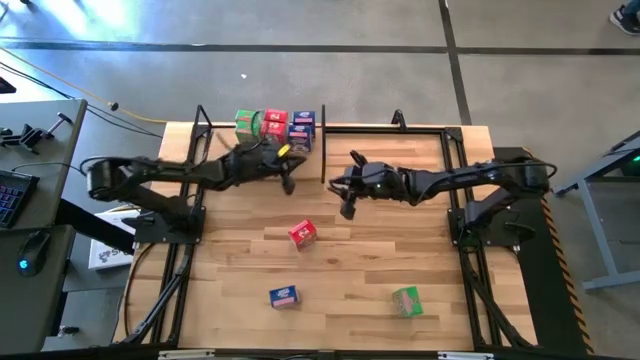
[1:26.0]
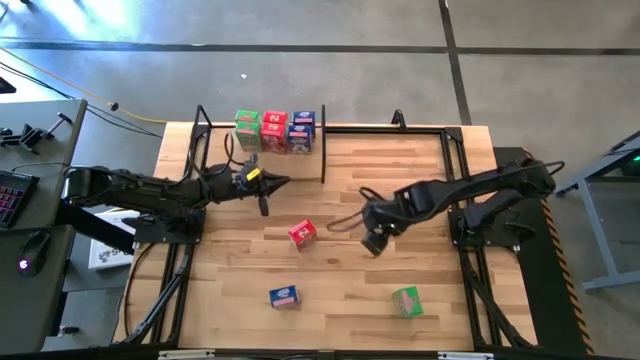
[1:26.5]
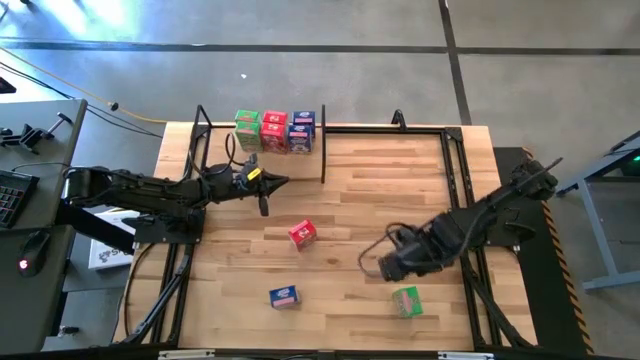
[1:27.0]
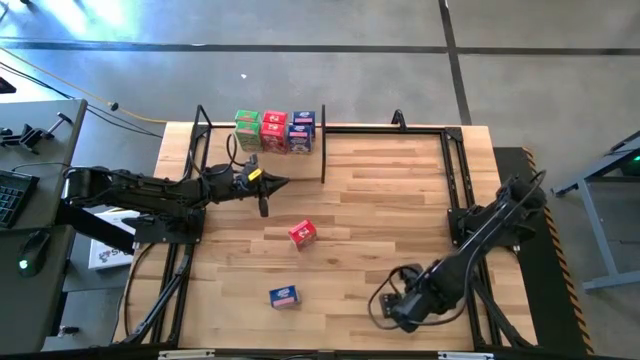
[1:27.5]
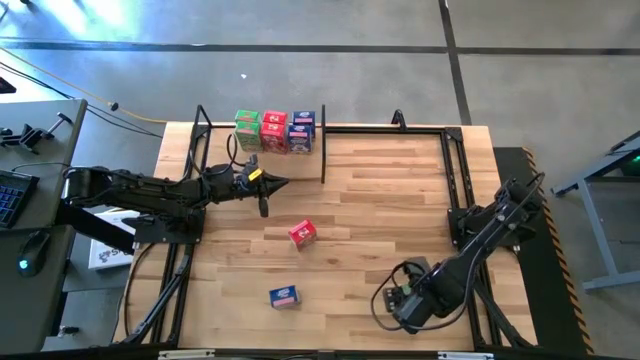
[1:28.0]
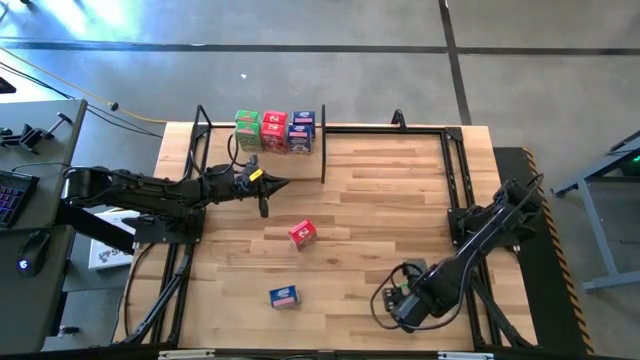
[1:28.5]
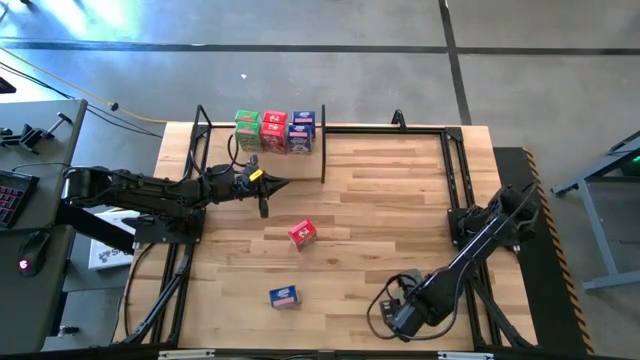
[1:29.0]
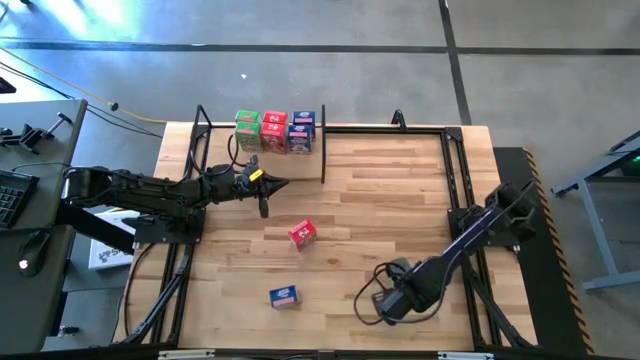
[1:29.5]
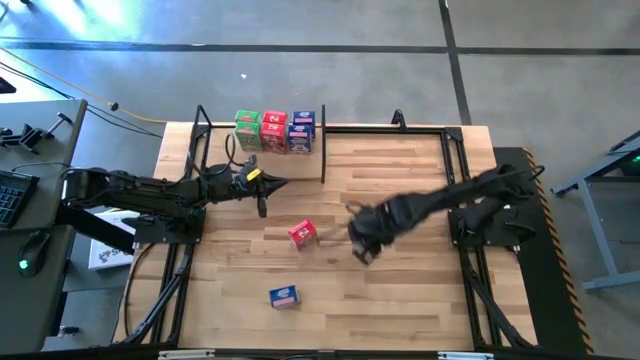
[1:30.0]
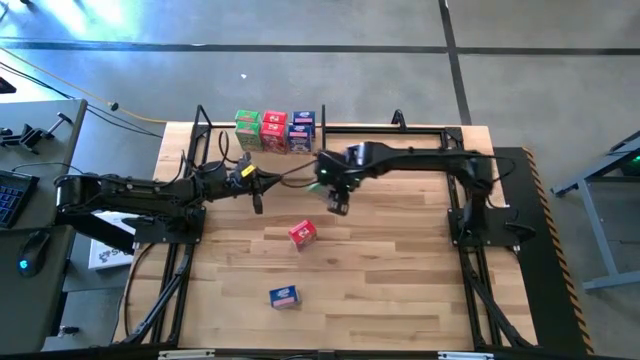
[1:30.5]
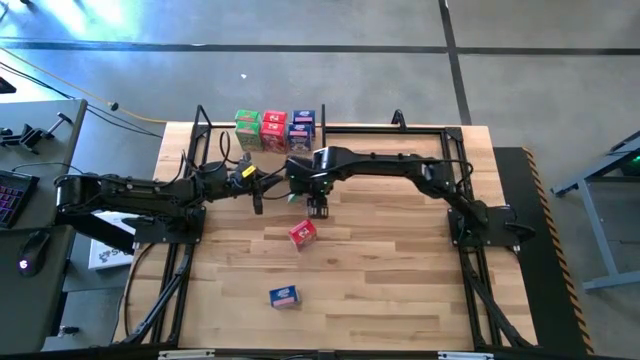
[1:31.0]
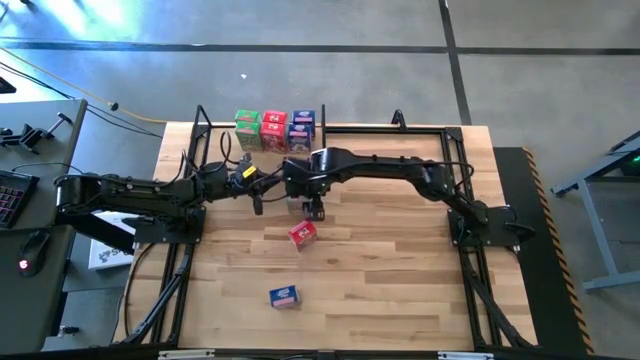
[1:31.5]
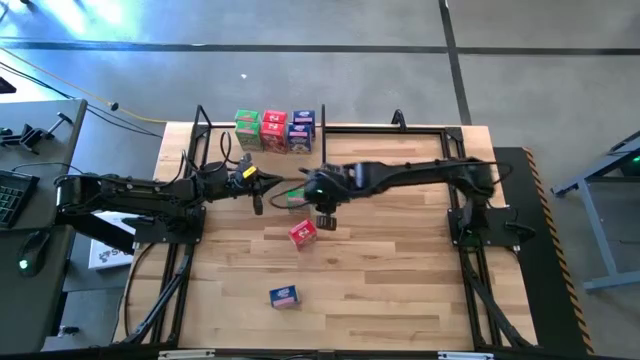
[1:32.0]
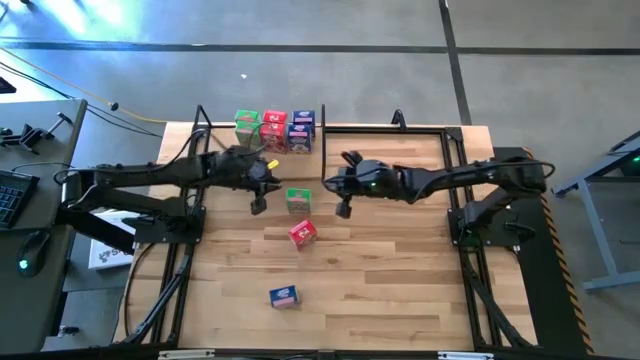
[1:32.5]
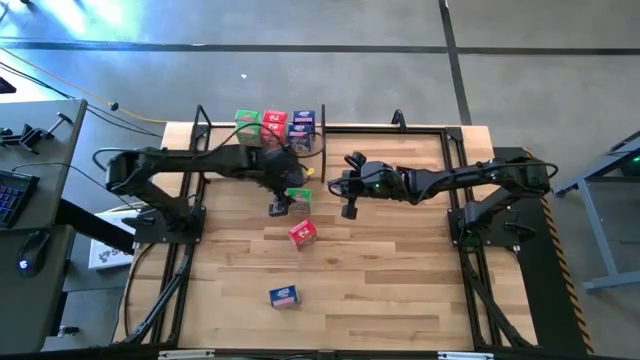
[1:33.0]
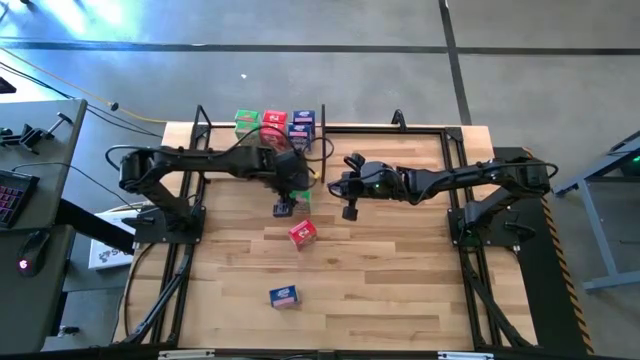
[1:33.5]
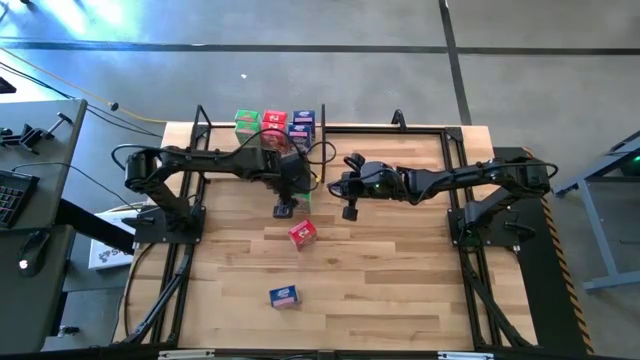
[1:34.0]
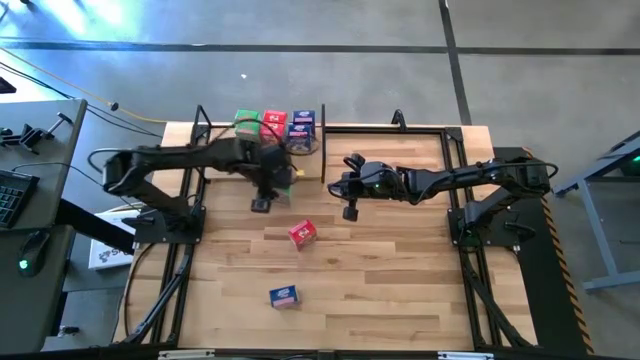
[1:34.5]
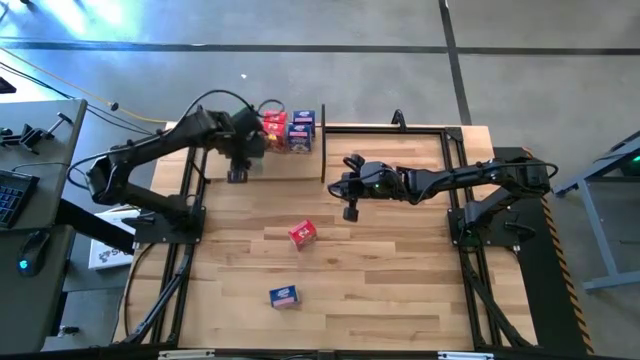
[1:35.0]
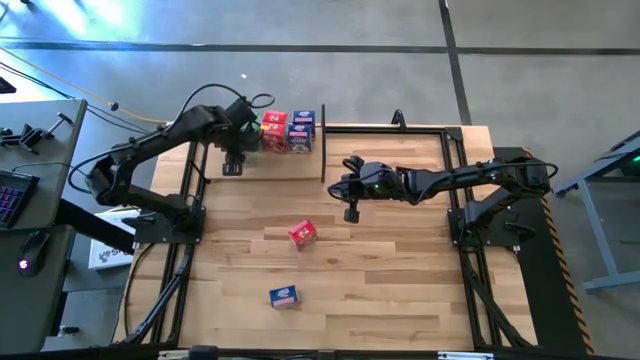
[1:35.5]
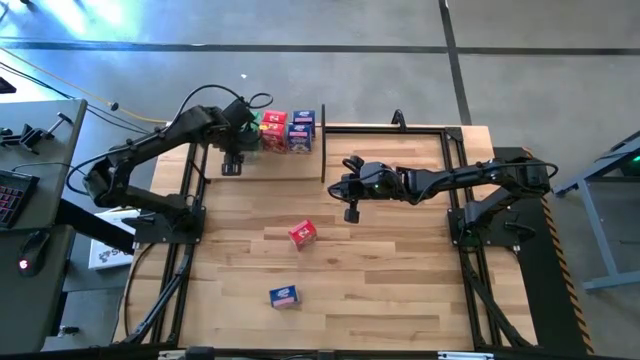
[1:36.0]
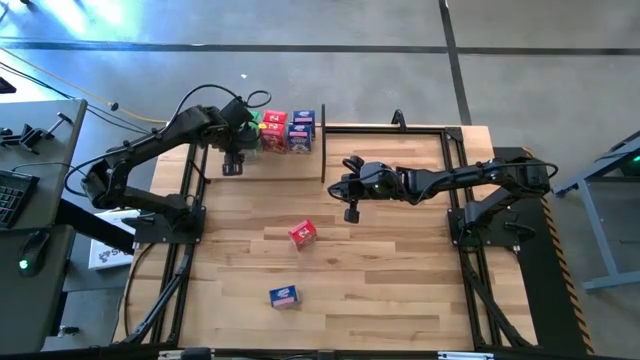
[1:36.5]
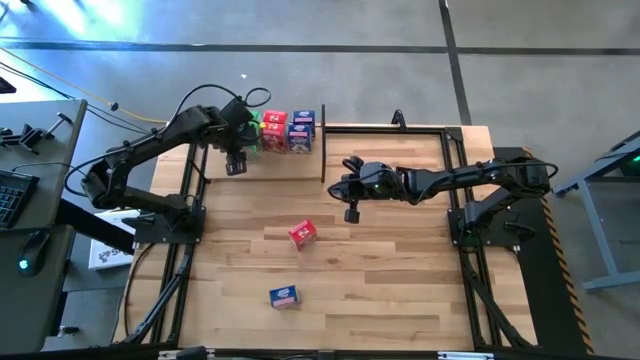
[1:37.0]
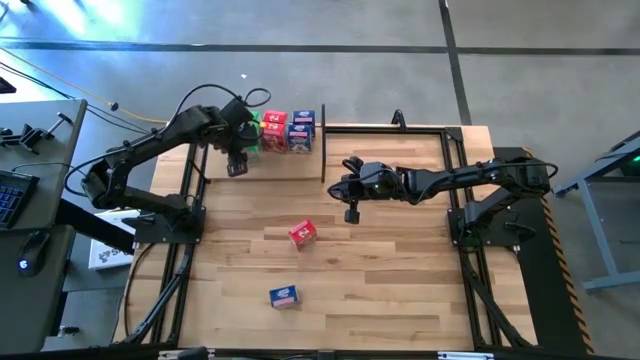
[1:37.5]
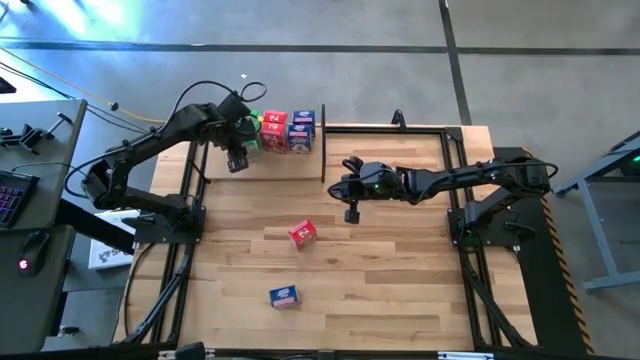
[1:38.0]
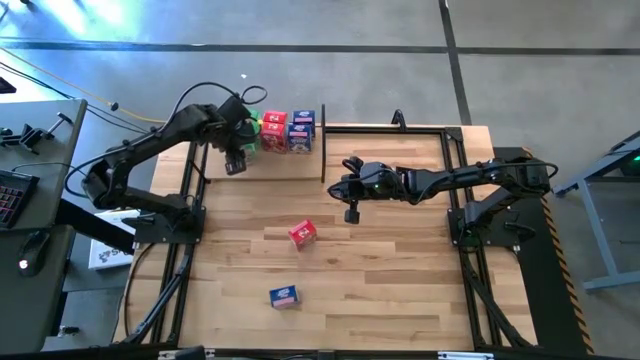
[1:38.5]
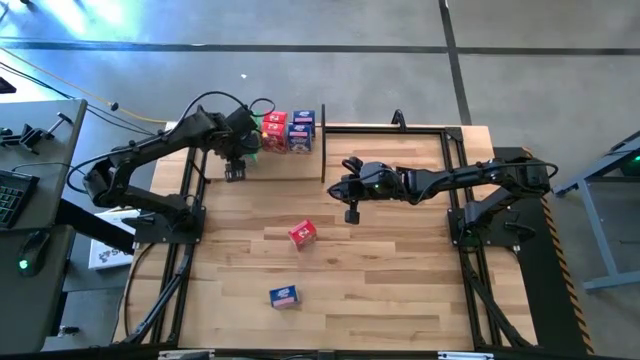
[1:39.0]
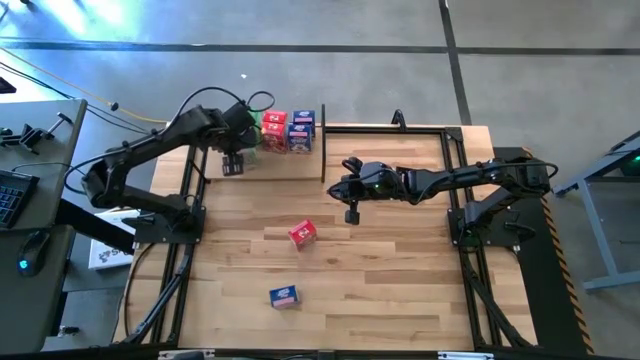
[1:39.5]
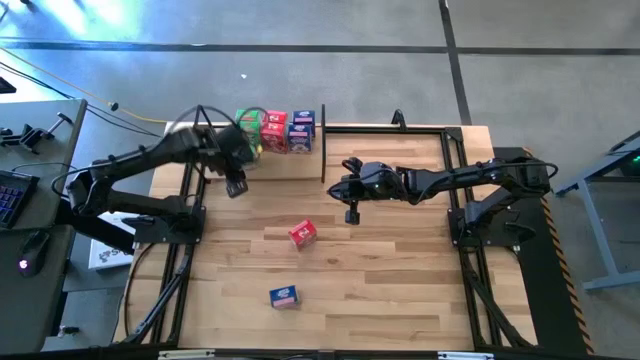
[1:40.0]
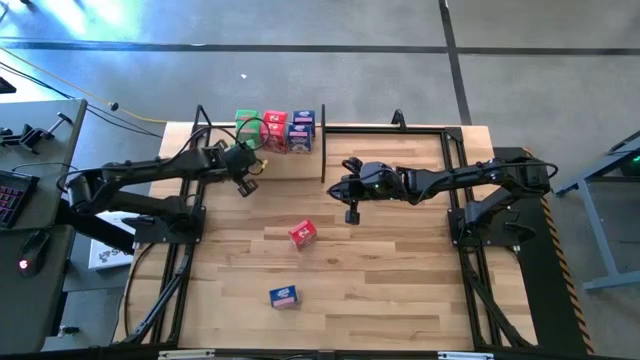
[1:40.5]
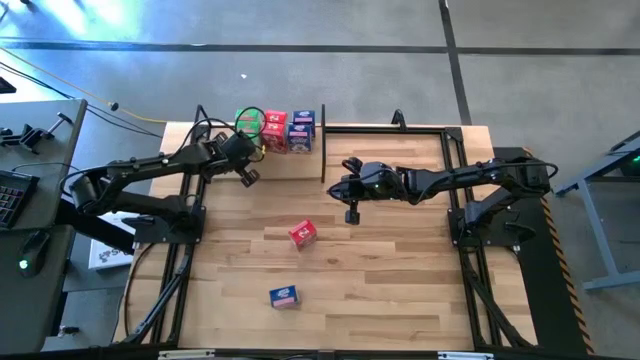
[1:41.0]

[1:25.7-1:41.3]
Task: Stack cereal on shelf
Put the green cereal box on the shelf aligned with the green cereal box

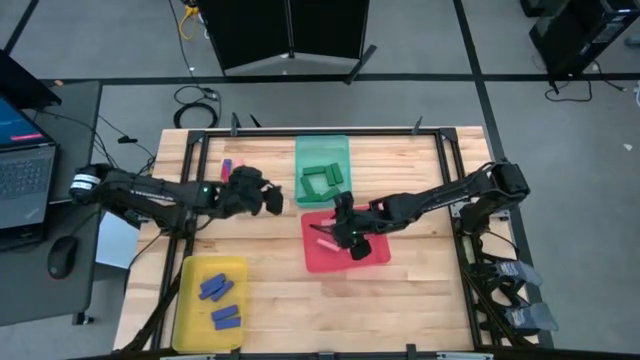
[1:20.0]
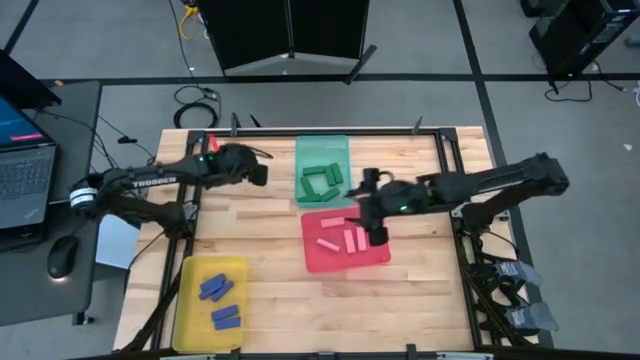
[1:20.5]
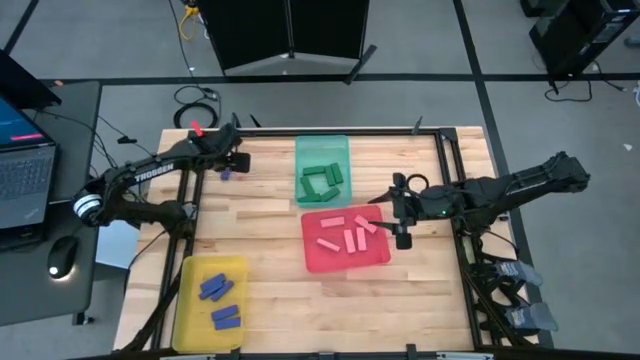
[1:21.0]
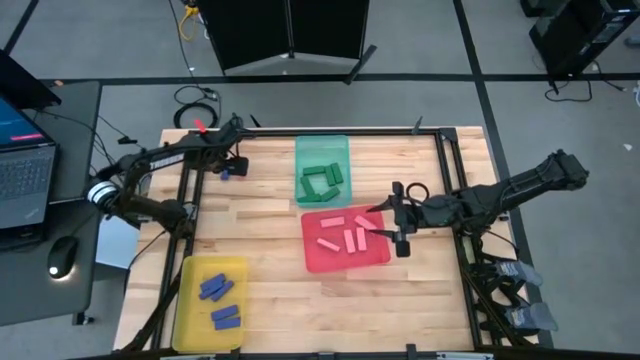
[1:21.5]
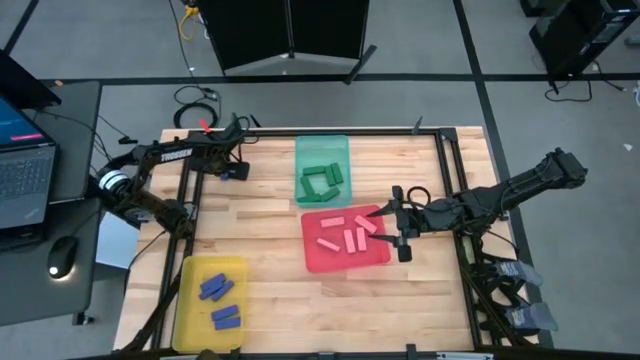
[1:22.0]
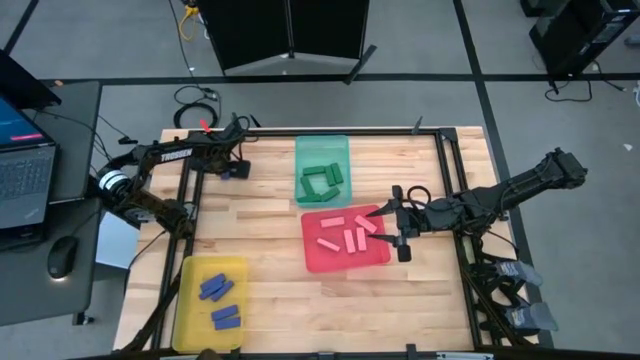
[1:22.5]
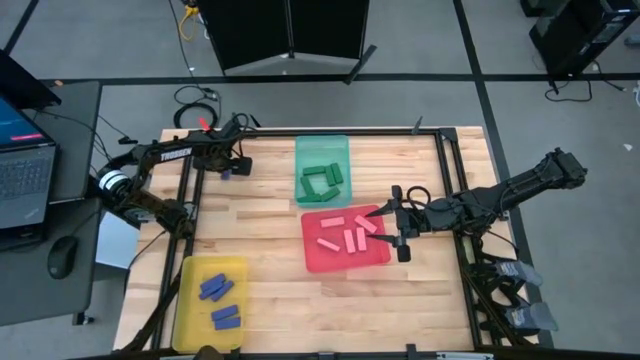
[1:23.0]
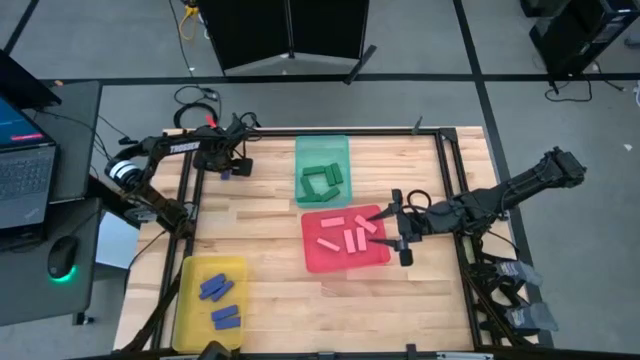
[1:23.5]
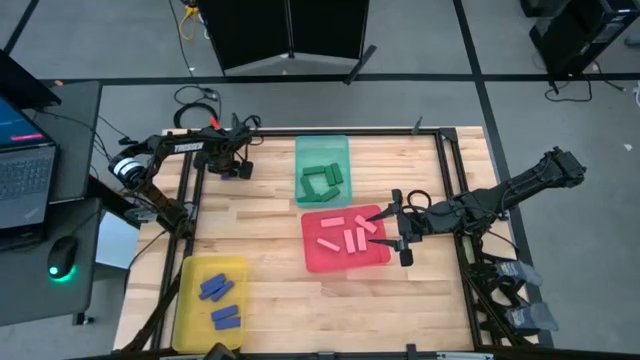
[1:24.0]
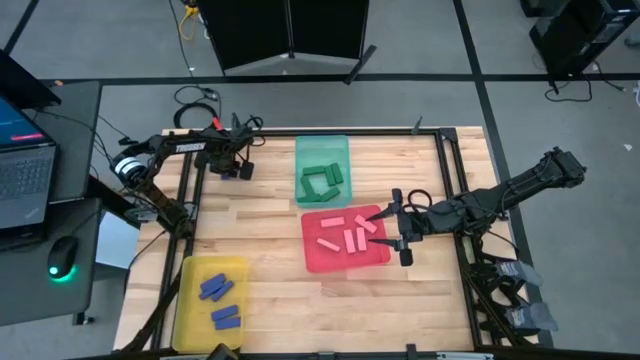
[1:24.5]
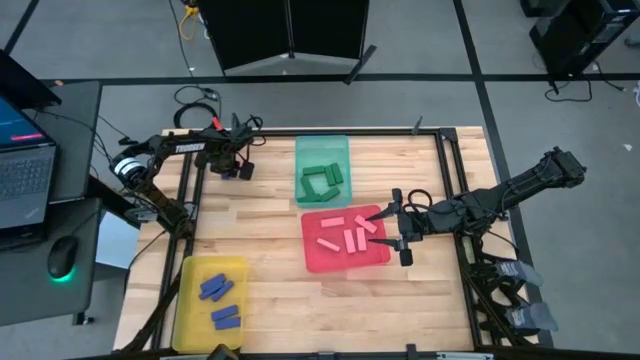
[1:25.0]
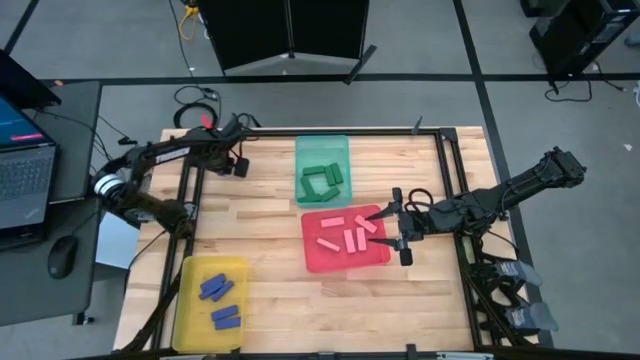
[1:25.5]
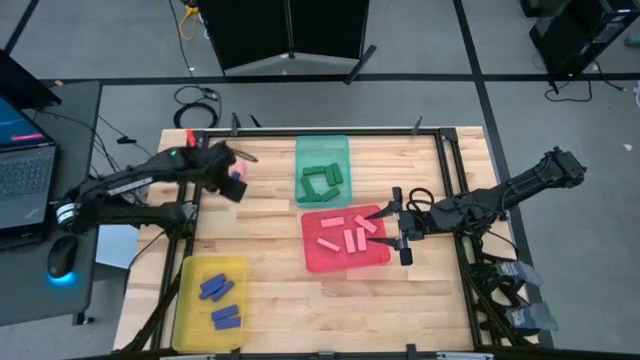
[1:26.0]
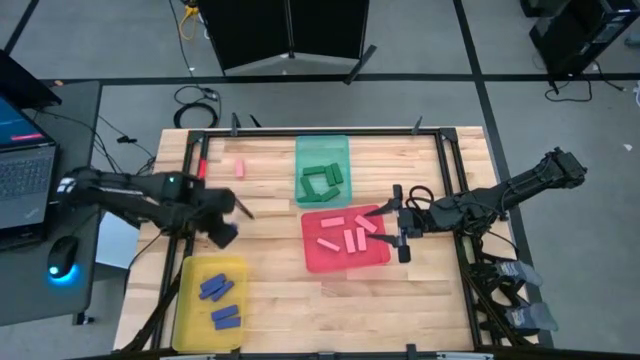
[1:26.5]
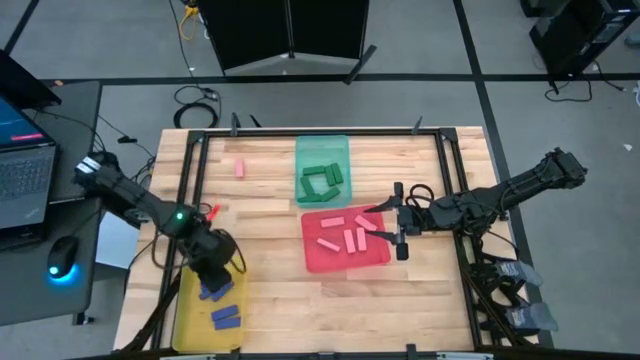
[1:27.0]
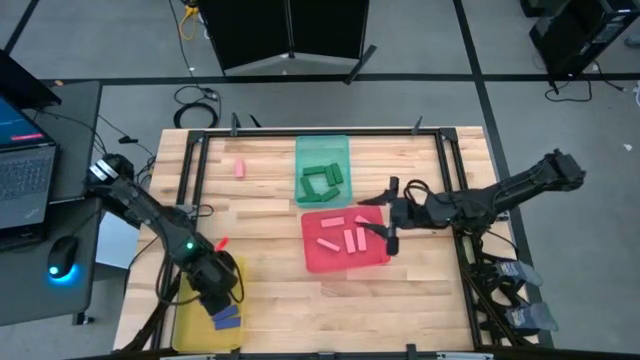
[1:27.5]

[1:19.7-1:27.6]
Task: Sort blocks
Put the blue block into the yellow bin
